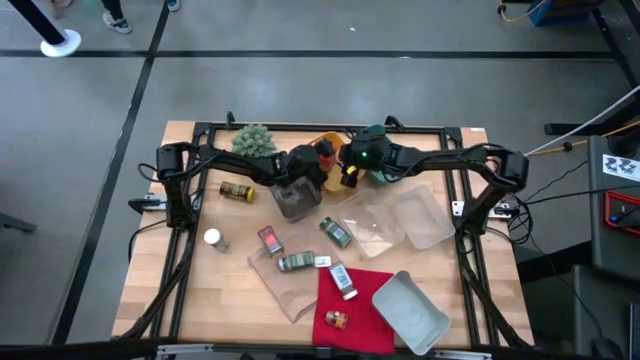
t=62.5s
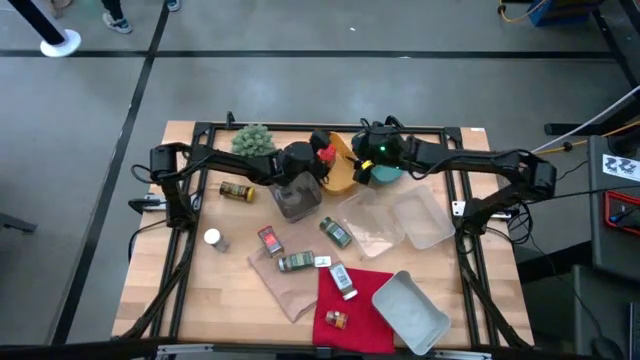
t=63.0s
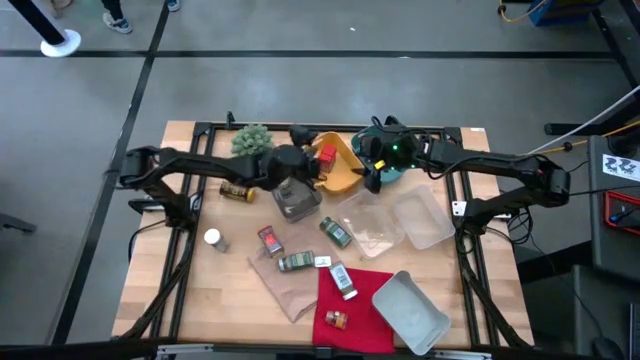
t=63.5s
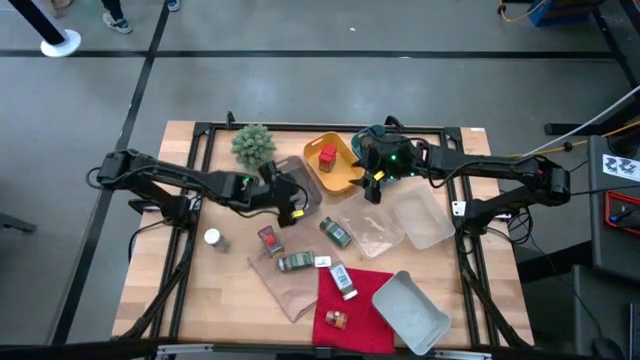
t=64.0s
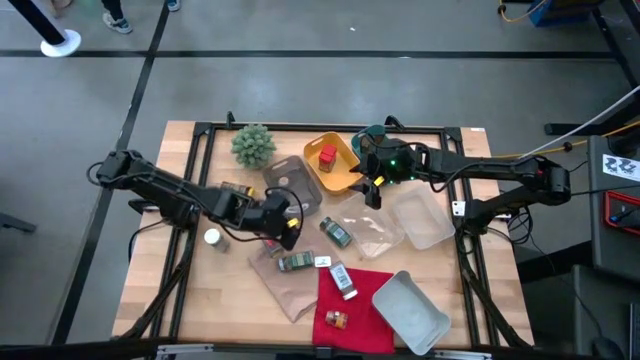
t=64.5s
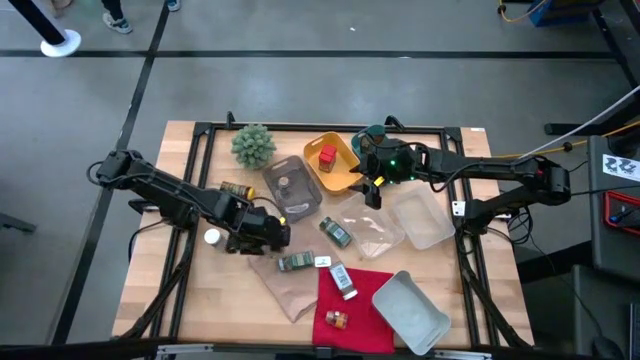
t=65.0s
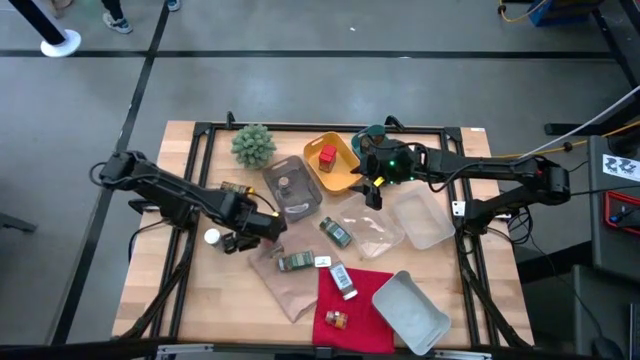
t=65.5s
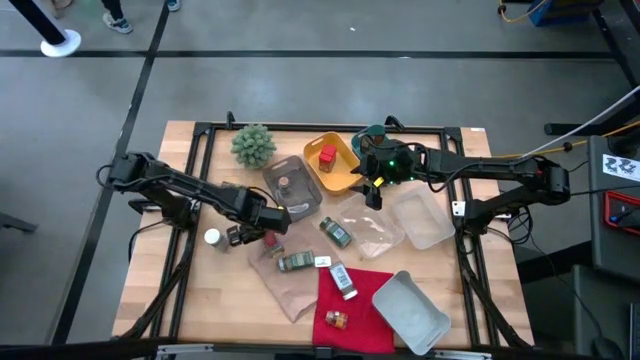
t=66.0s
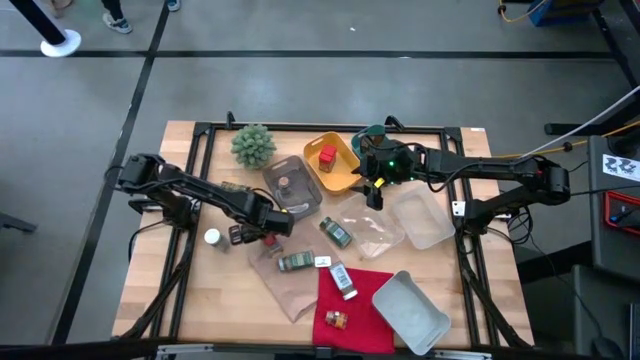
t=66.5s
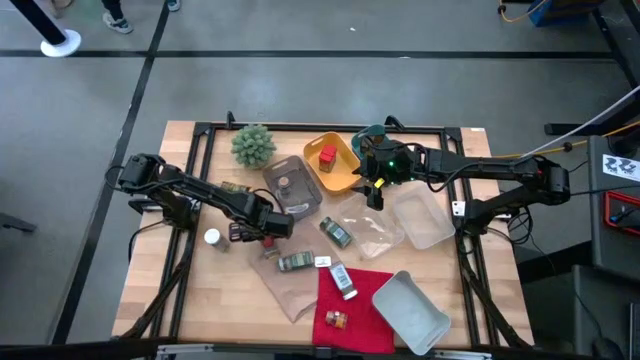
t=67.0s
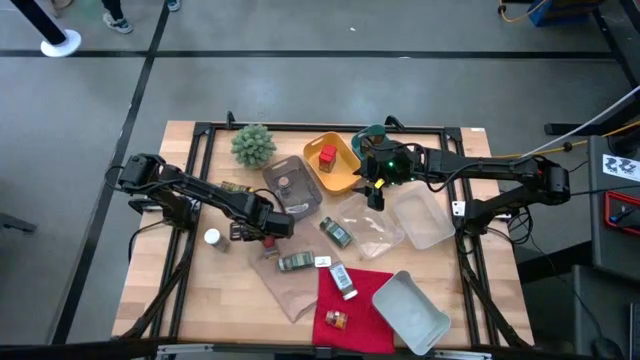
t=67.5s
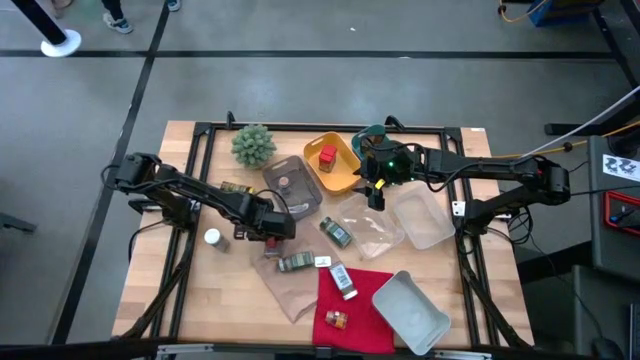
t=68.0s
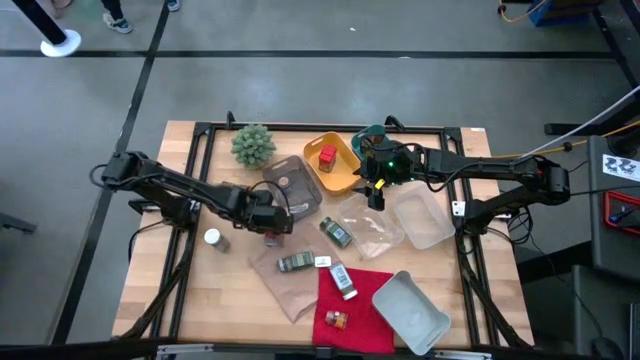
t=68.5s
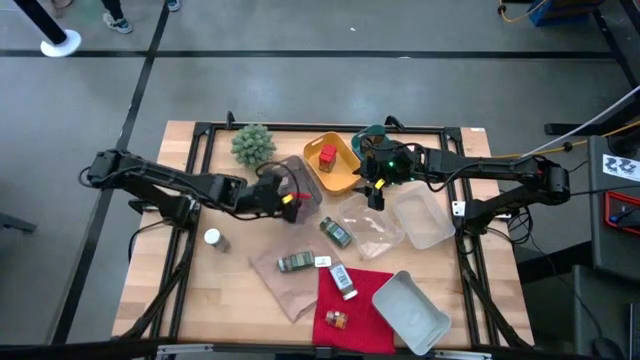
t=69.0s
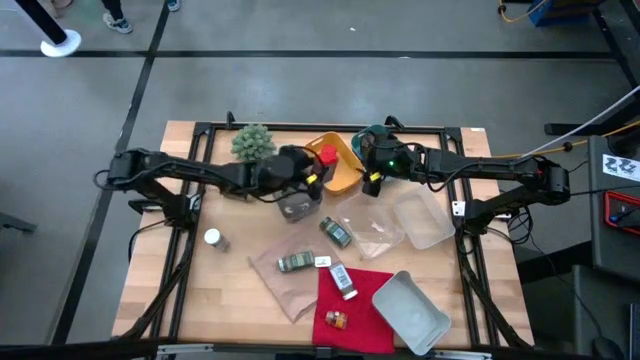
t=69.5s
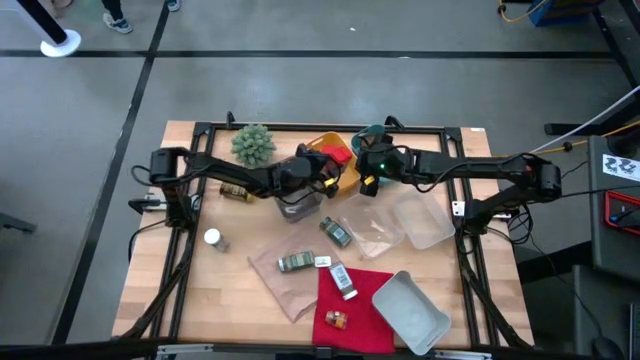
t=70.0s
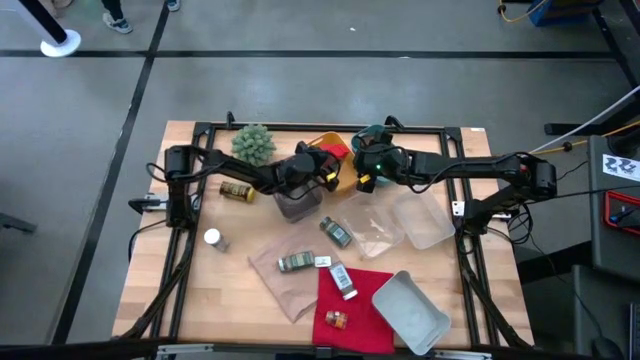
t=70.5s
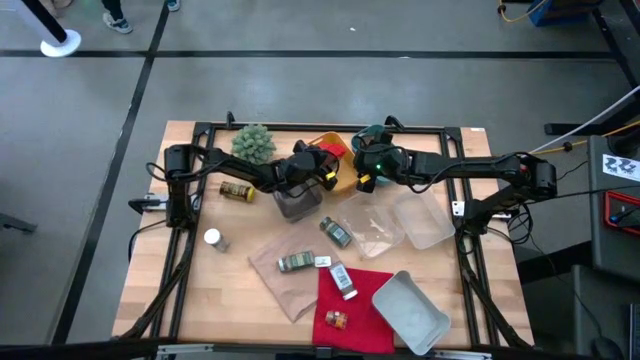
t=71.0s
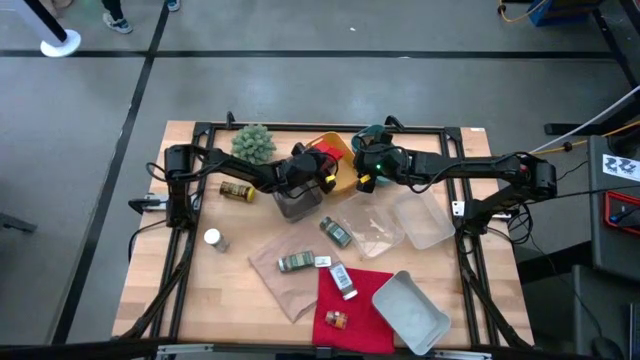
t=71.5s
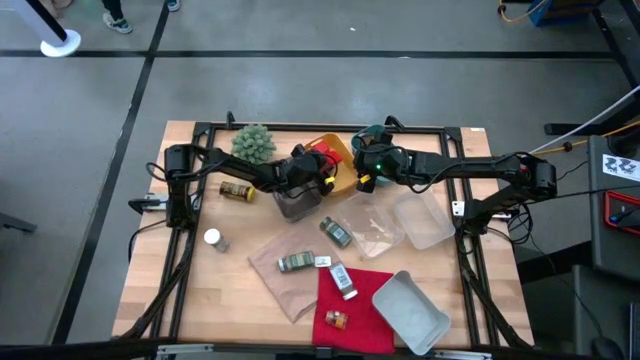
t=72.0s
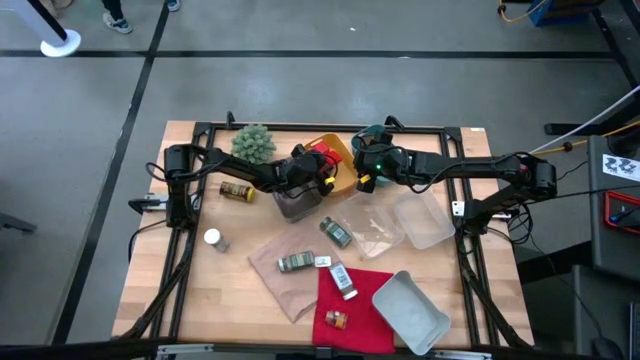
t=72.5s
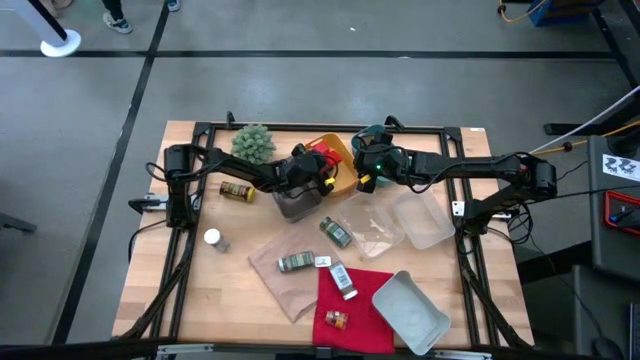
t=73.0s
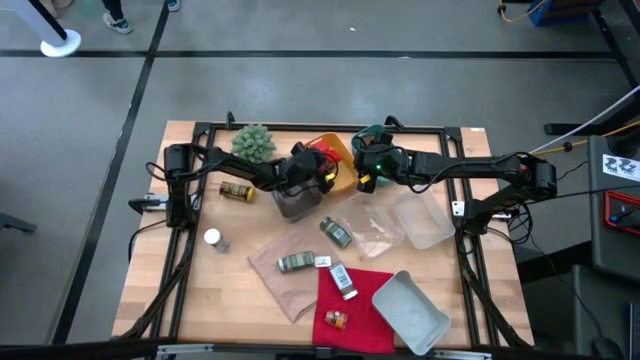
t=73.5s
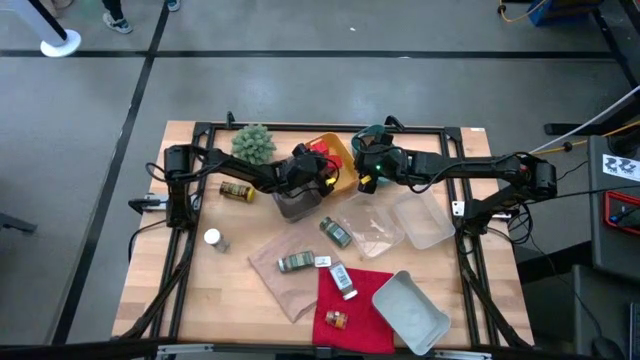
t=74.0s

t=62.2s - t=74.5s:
Task: Sort spices by type
Put the red seasoning can into the yellow bin

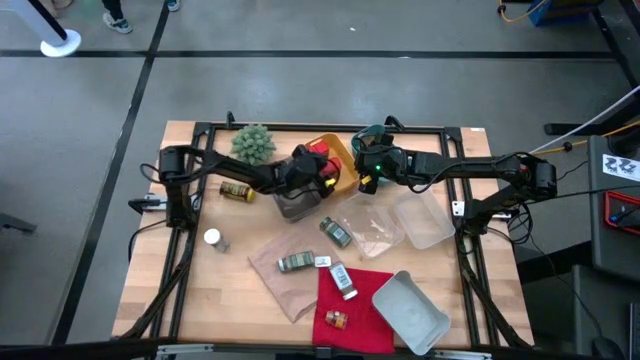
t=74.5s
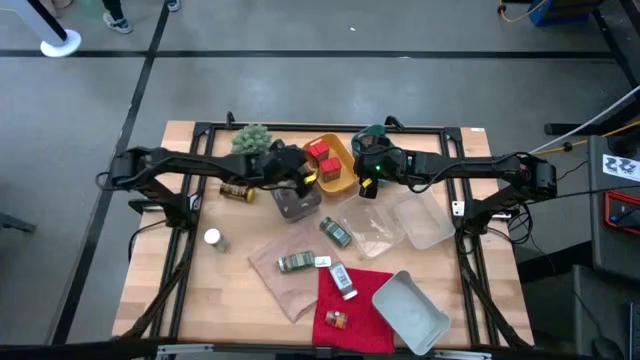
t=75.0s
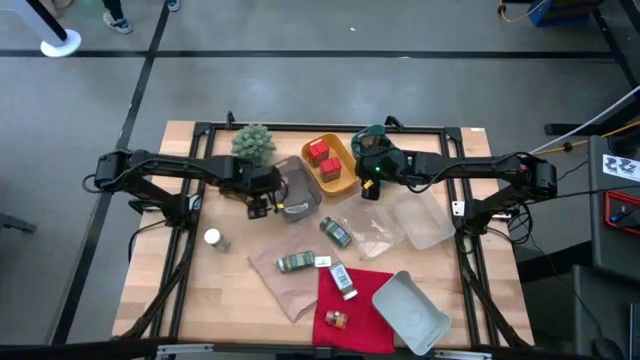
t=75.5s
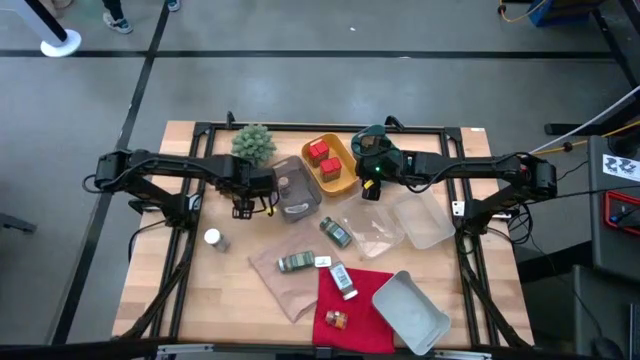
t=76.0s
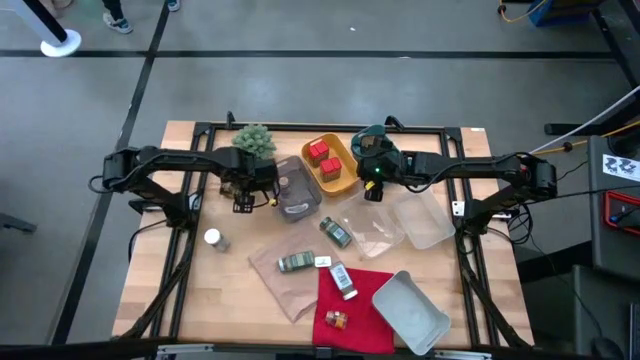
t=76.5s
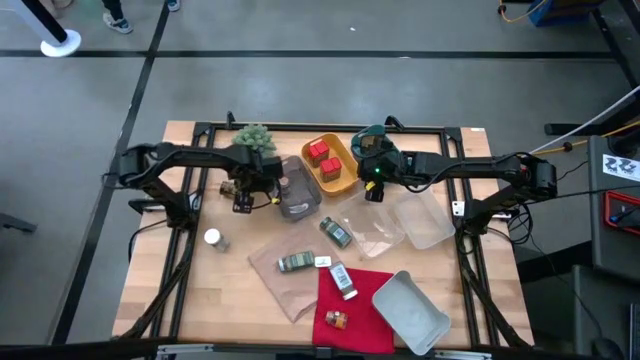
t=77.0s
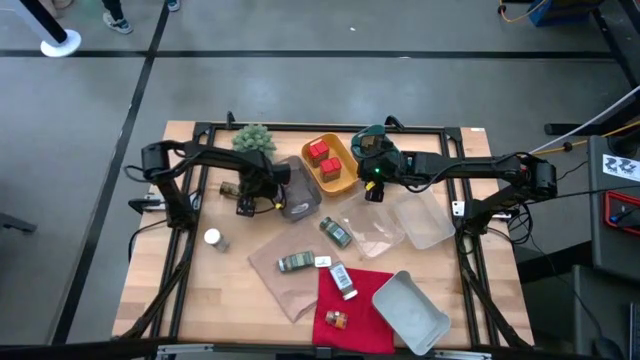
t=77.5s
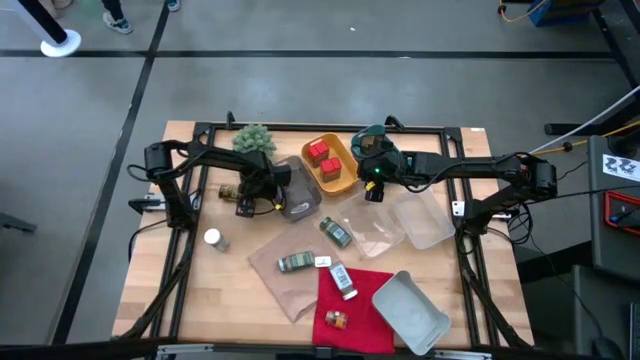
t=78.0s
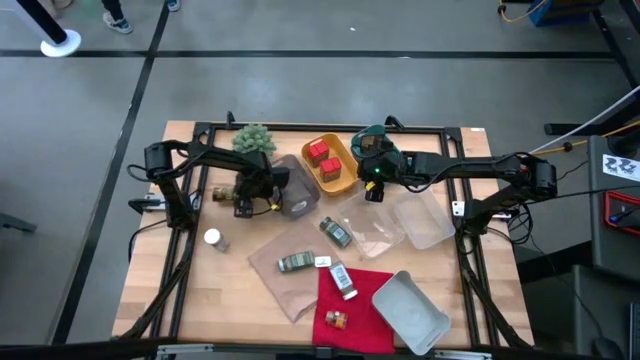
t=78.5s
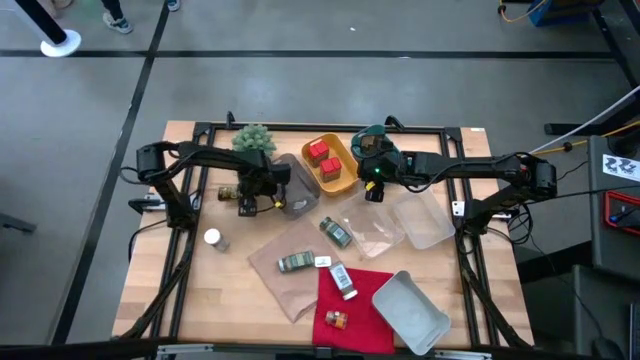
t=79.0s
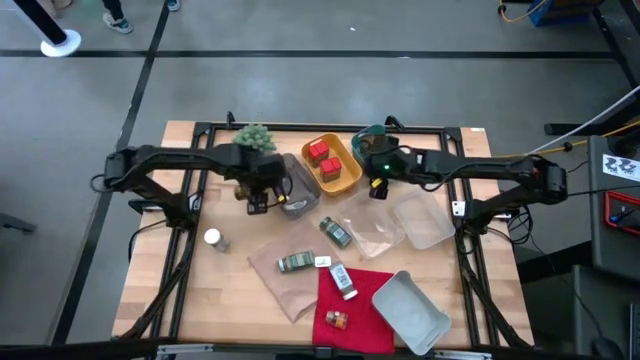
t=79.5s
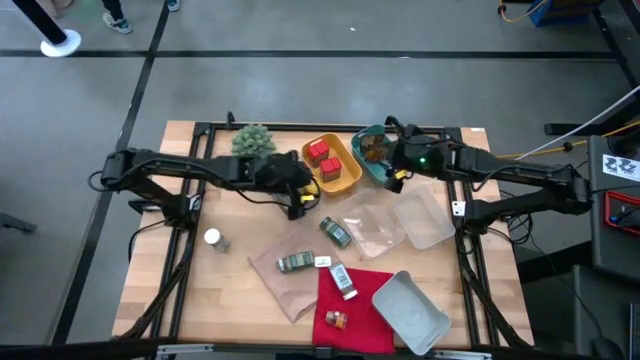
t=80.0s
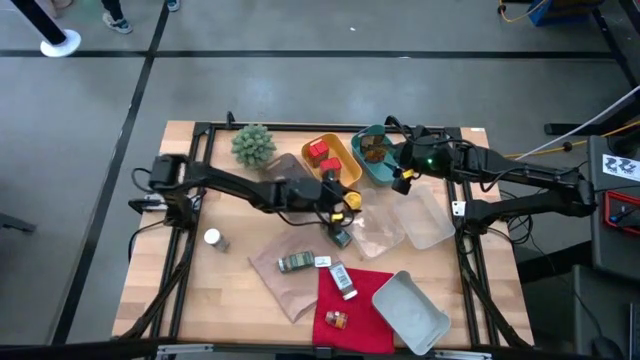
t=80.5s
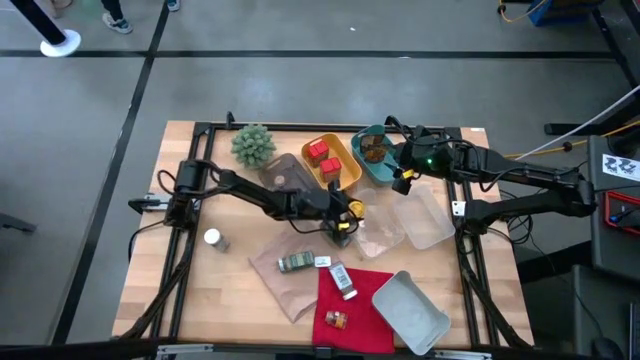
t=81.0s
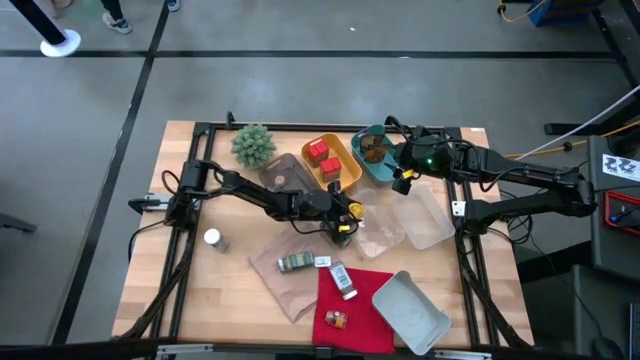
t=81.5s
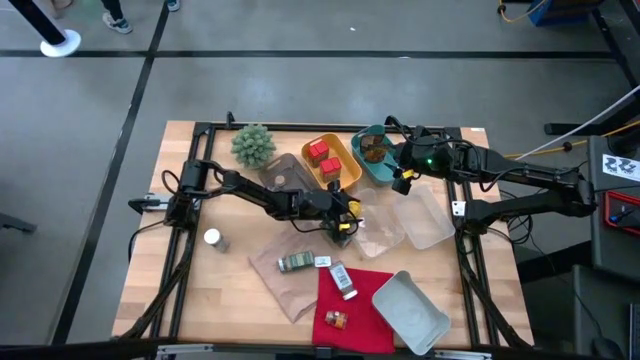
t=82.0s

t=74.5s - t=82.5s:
Put the yellow seasoning bottle into the left transparent bin

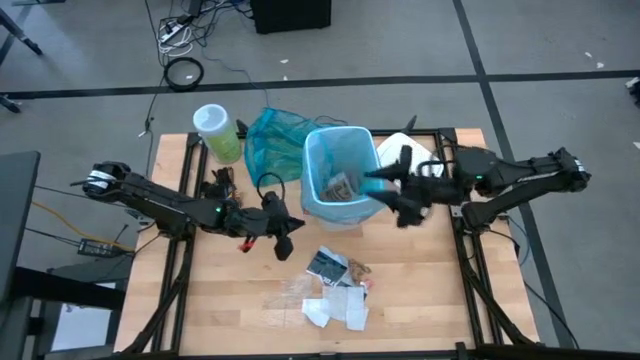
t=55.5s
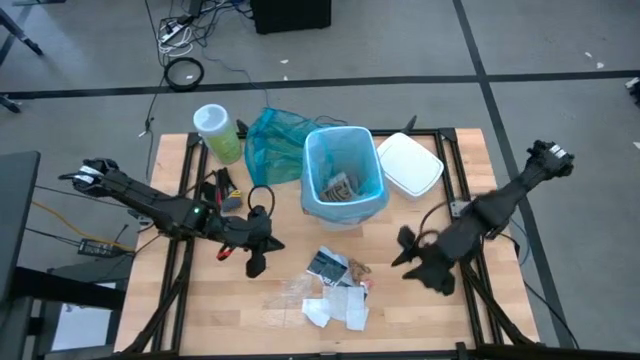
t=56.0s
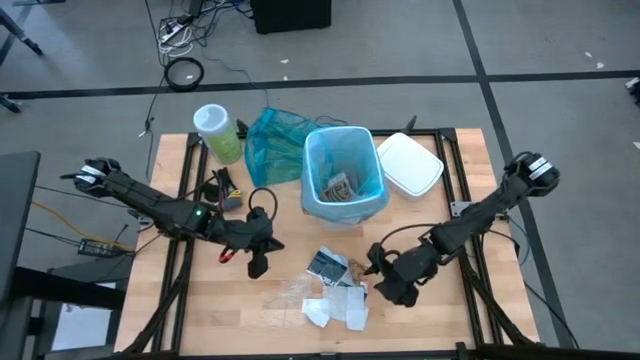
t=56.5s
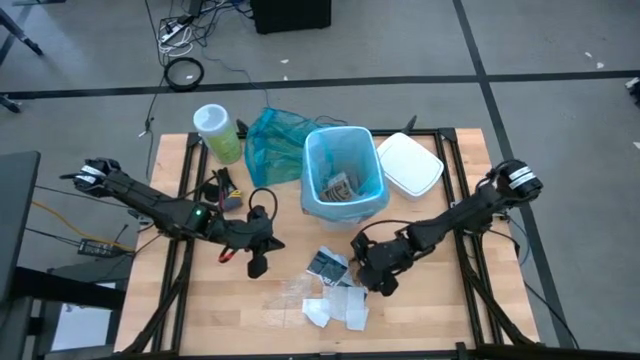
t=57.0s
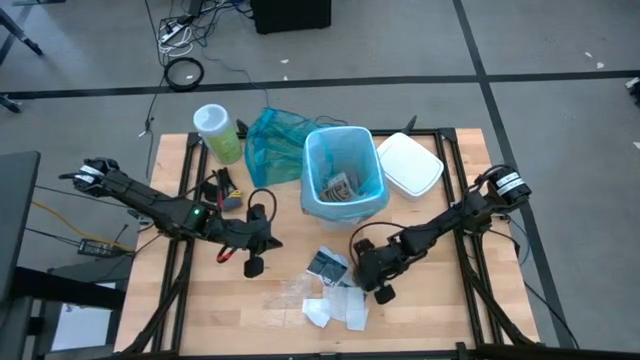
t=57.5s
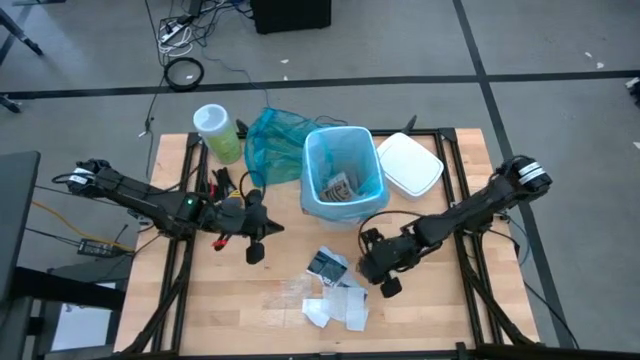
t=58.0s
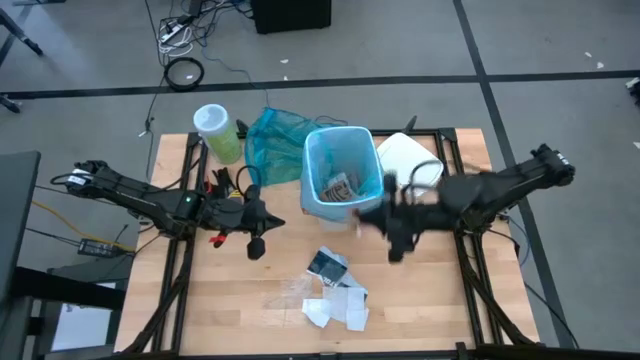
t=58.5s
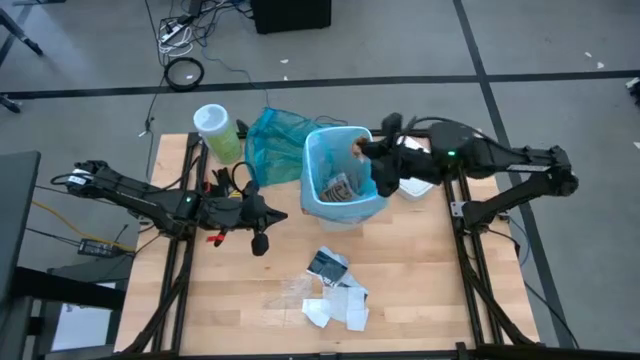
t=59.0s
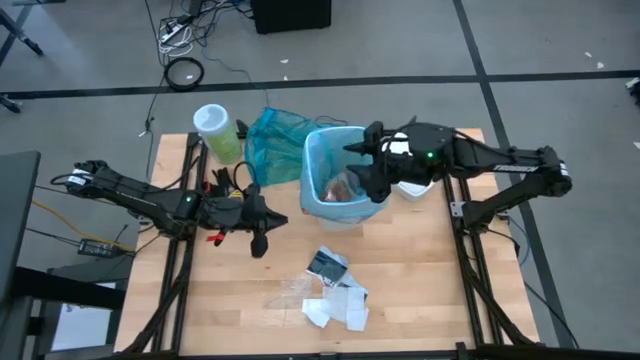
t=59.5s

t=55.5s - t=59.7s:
Task: place trash/remove bag and relplace
Put the brown paper into the white trash bin
